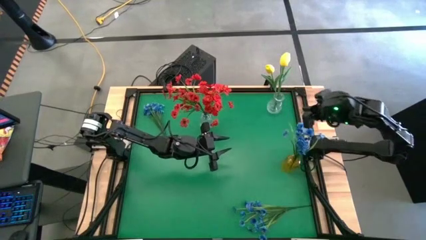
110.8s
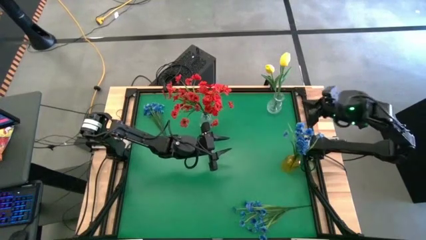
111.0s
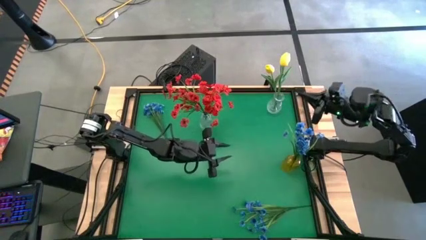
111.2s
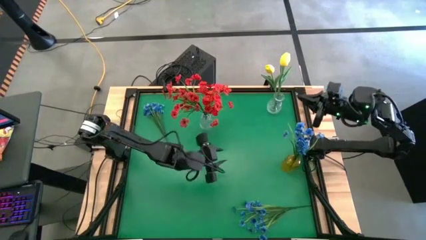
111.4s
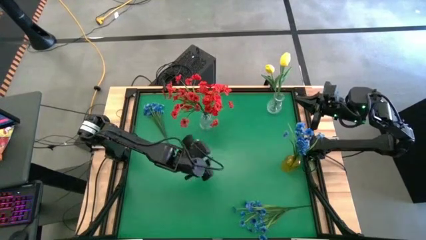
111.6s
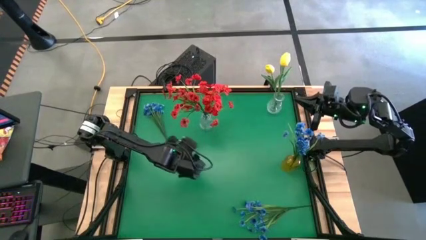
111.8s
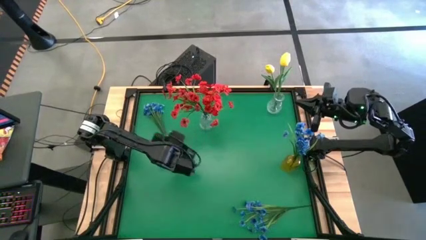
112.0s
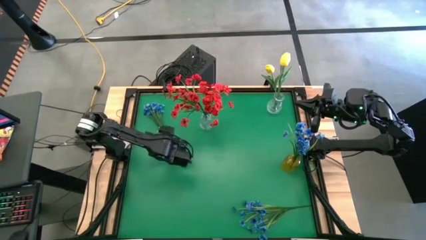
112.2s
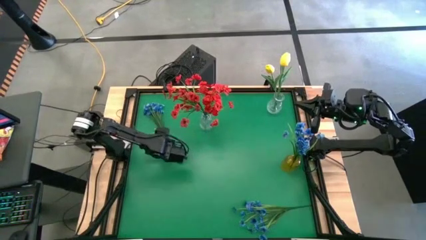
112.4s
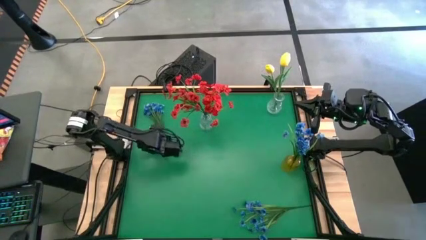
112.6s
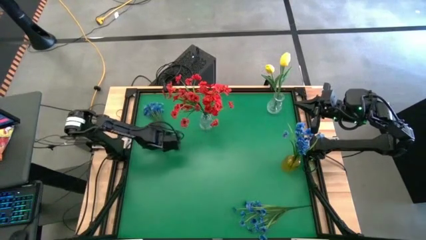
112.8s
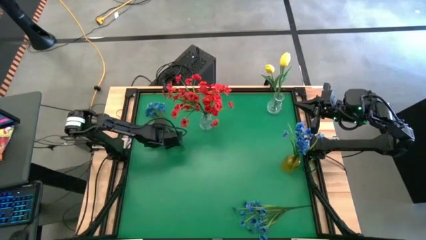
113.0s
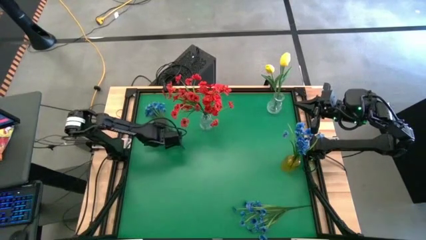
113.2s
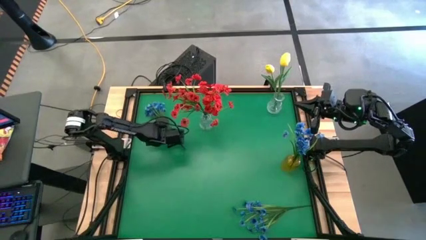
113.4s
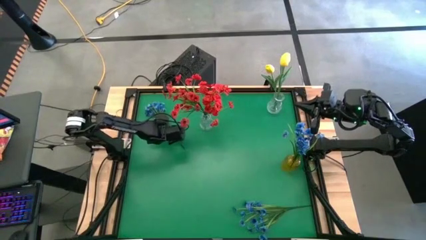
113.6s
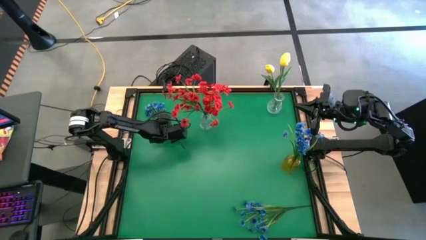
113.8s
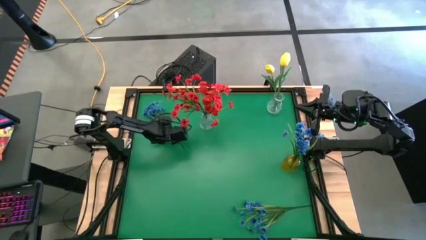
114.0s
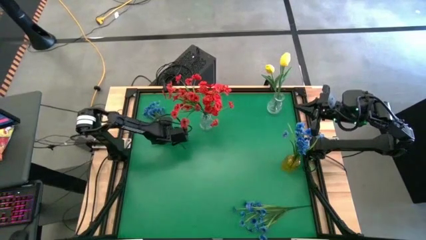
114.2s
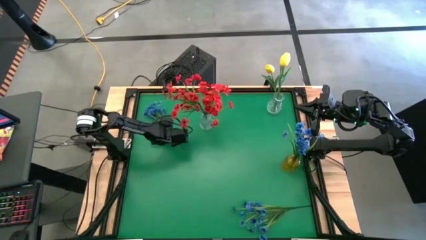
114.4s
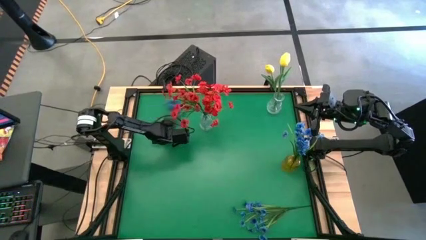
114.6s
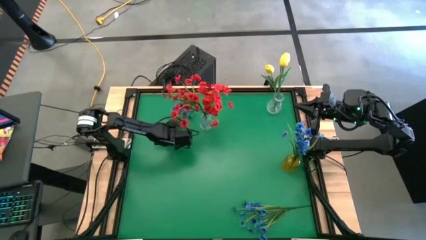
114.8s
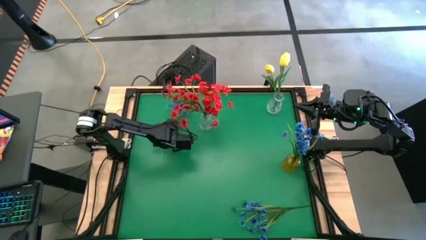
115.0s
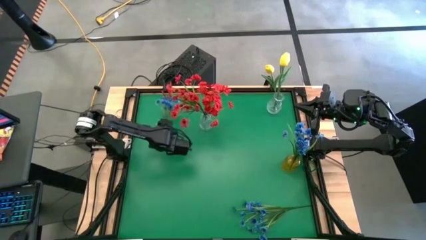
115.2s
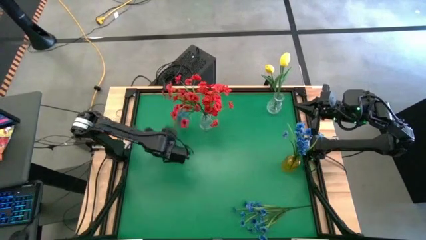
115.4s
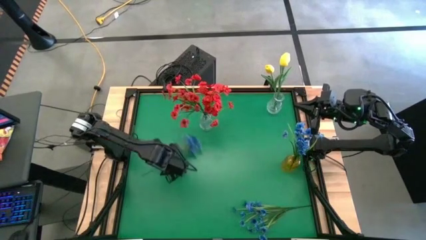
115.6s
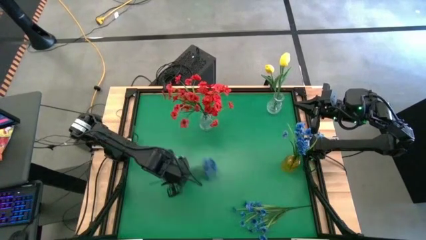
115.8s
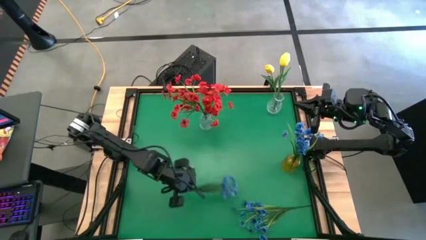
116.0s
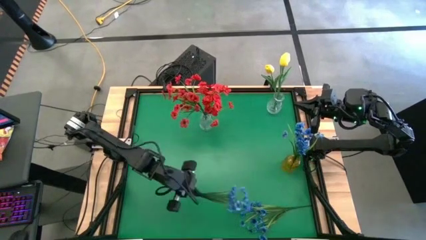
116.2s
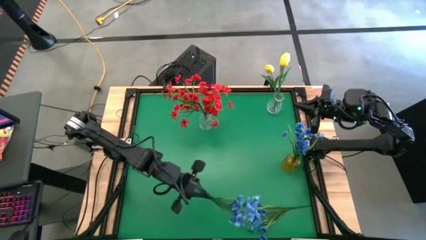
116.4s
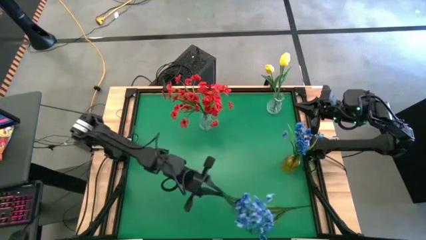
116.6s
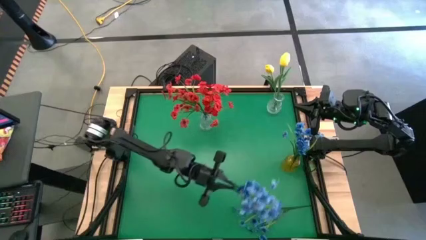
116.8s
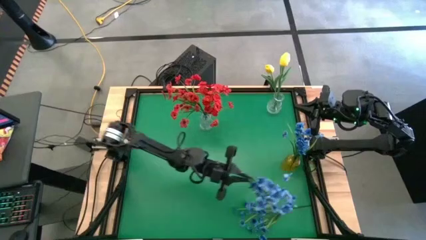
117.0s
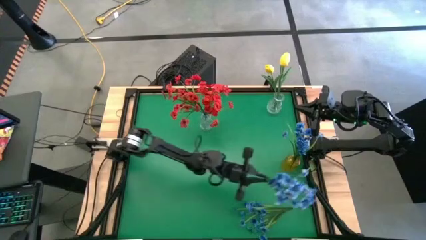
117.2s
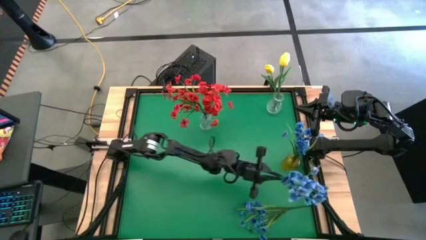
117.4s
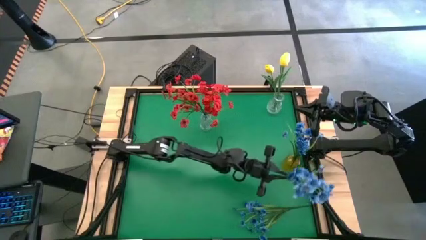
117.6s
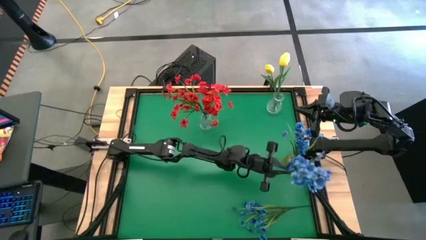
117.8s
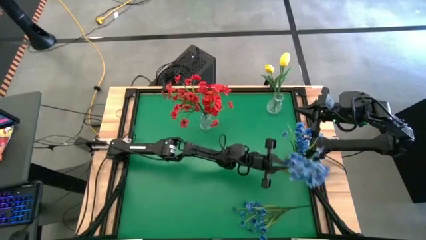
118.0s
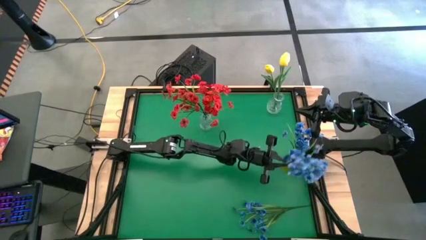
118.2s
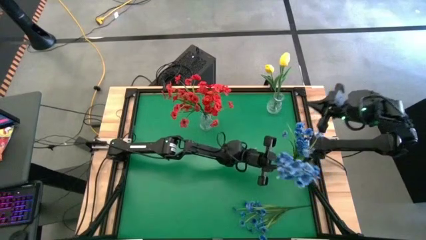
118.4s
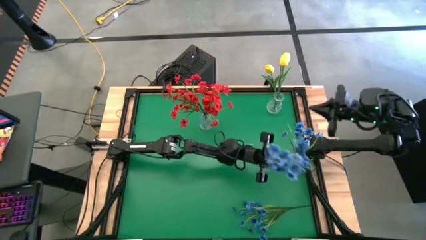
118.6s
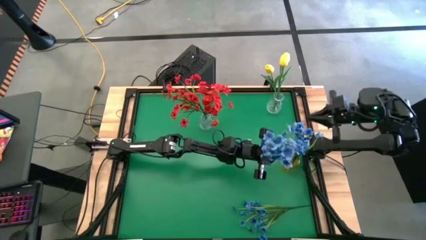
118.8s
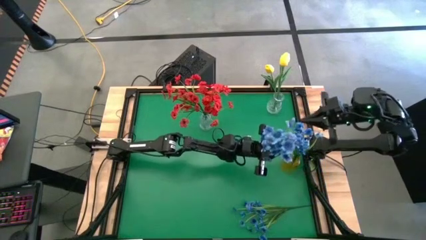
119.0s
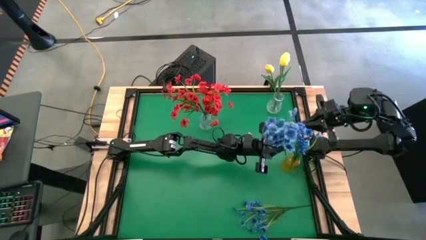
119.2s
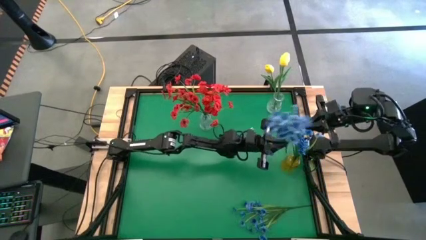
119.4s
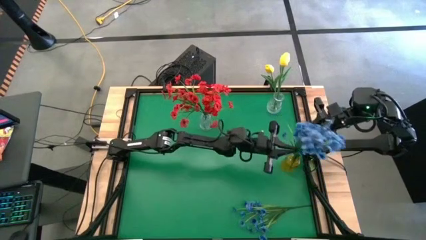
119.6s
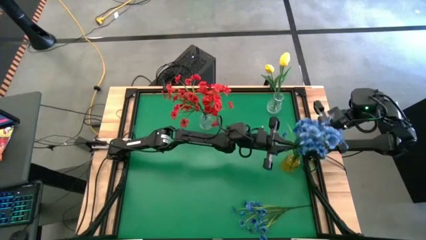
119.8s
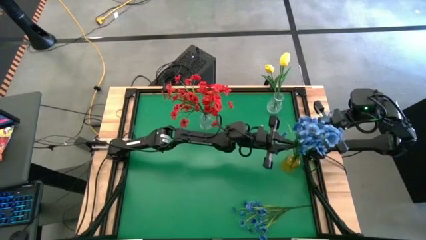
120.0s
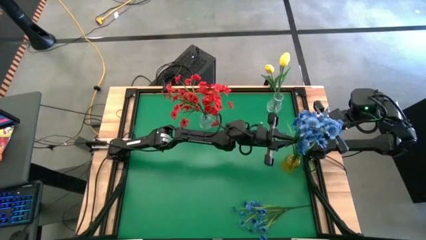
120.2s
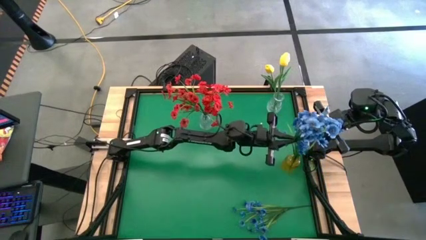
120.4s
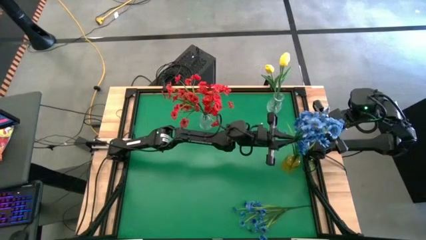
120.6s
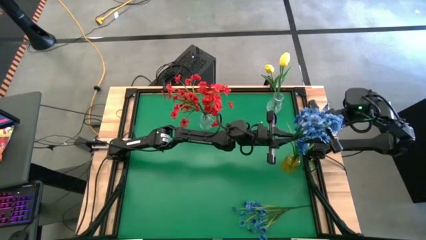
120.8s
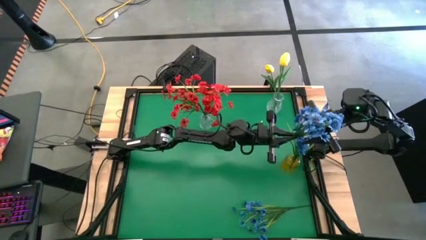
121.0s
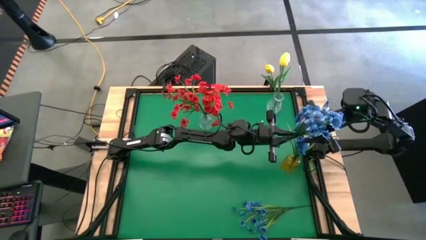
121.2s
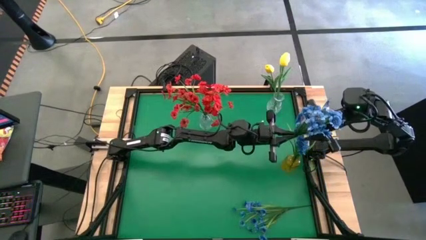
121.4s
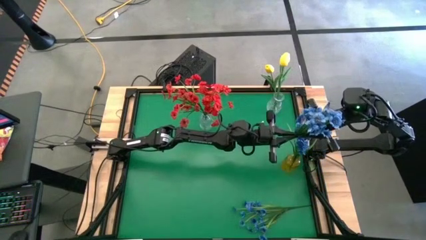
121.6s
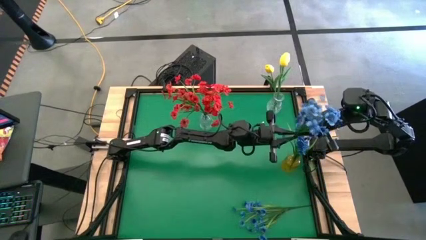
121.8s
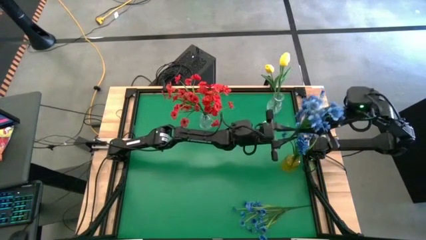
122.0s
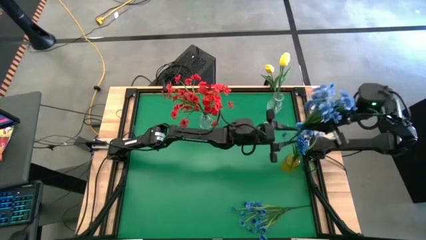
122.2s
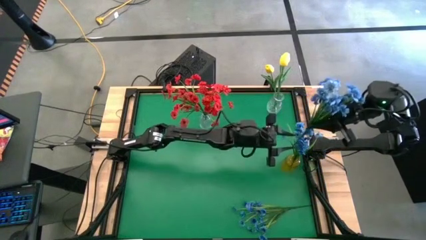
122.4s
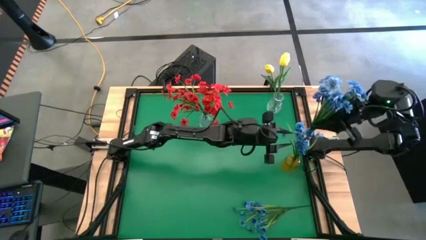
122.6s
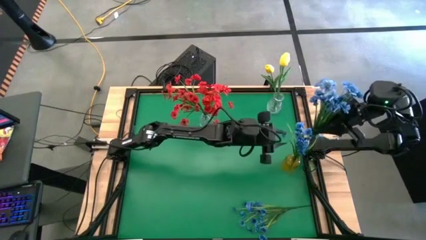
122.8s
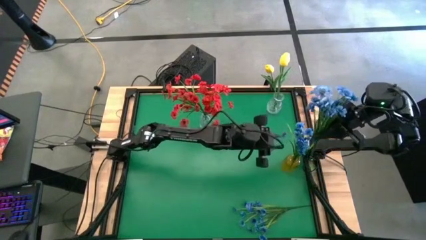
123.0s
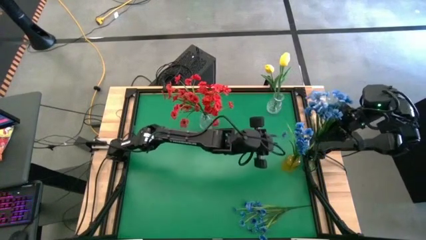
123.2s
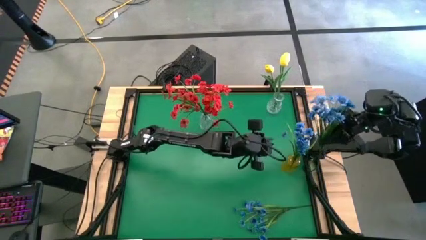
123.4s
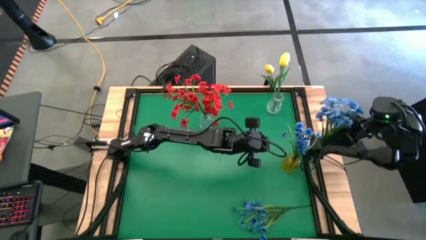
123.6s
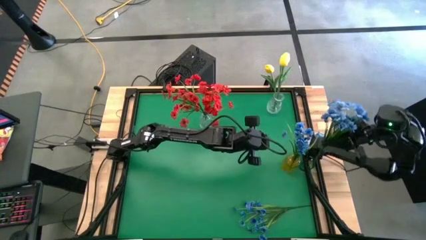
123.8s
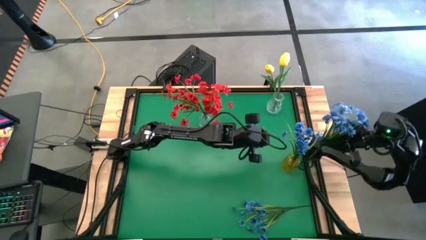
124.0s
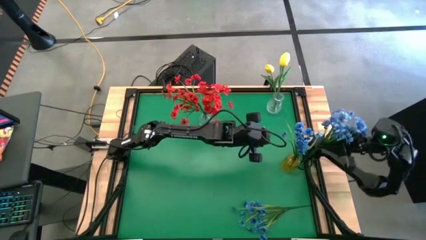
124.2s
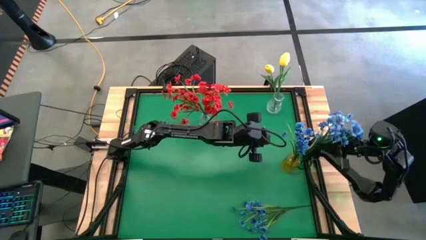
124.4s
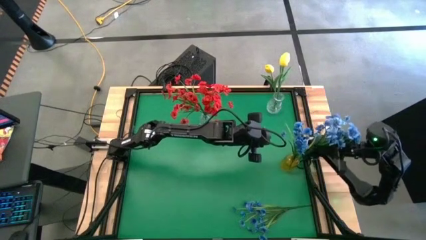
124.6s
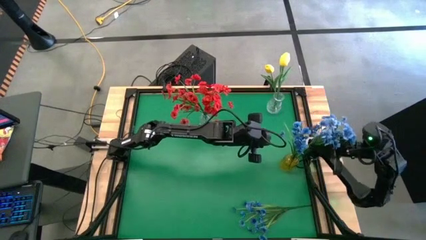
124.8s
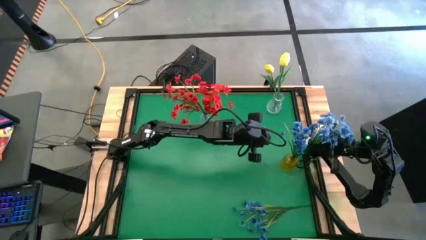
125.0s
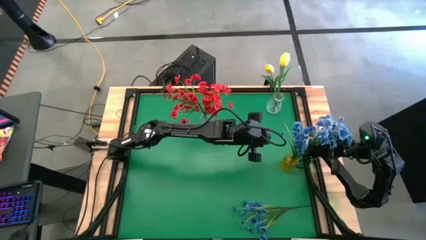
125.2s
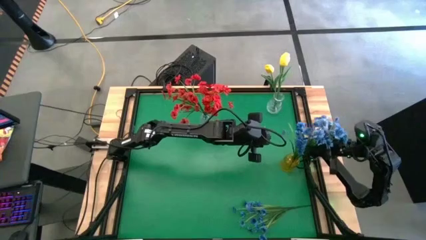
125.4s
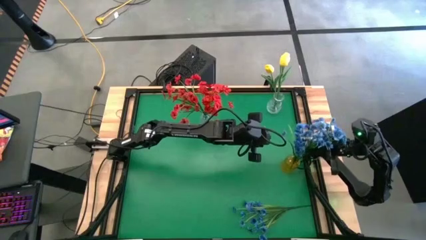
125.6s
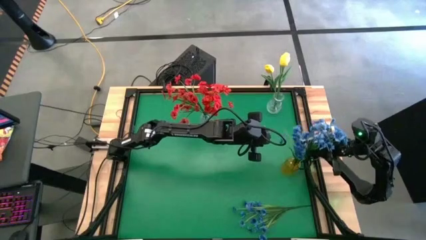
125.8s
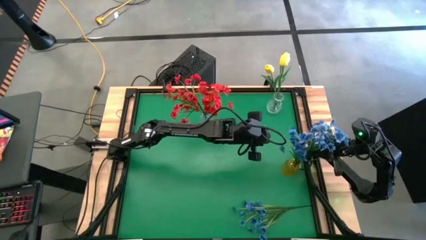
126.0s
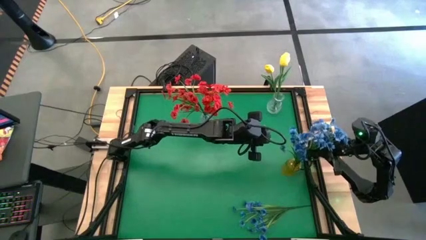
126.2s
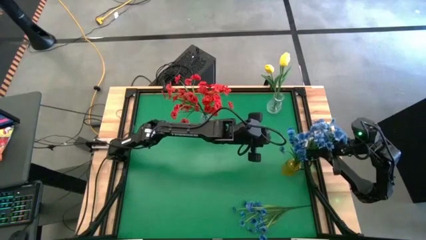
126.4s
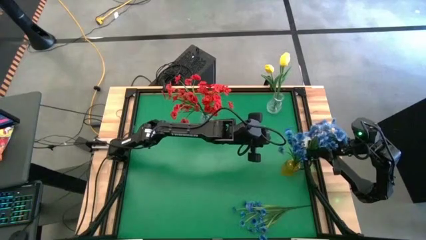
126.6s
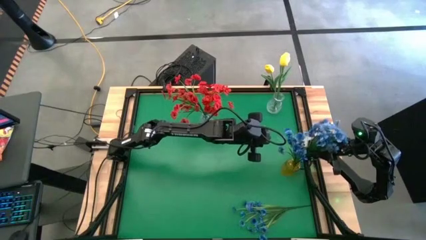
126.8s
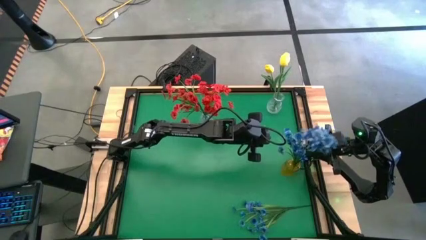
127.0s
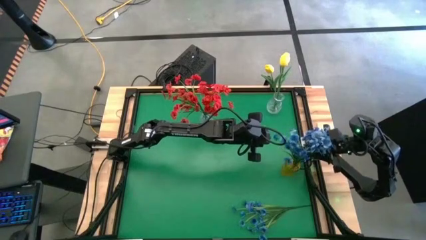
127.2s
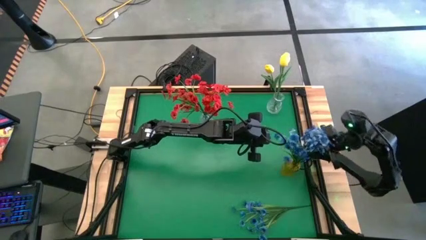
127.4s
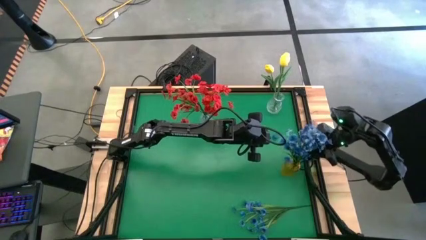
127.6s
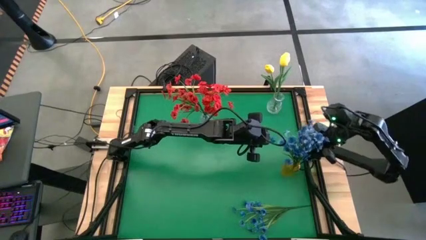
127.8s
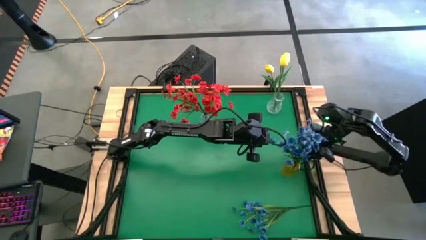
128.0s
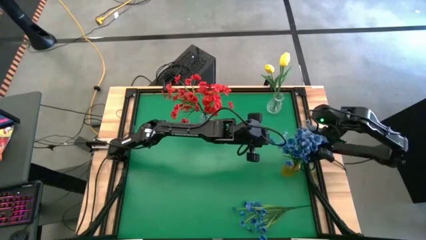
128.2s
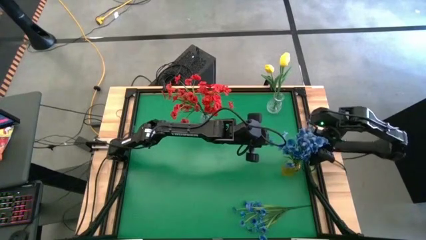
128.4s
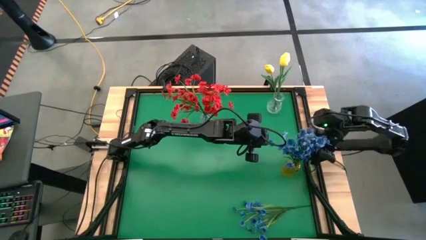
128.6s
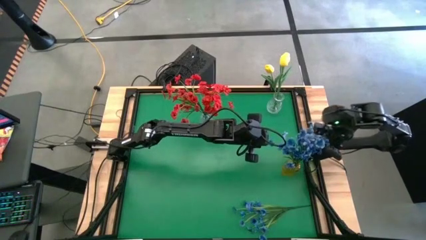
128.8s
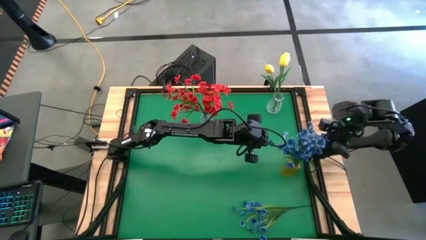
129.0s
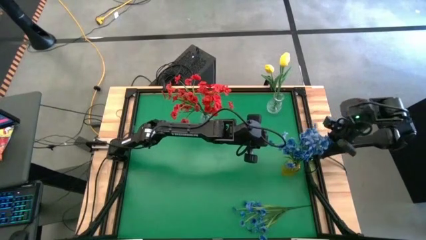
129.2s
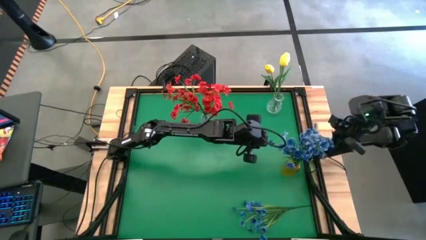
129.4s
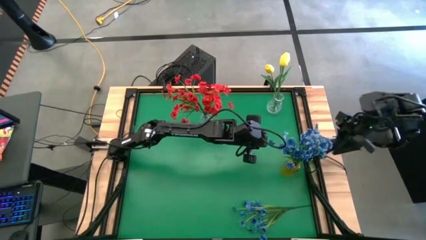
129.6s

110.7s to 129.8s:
Task: Sort flowers into vase by color
Put the top blue flowers into the yellow transparent vase
